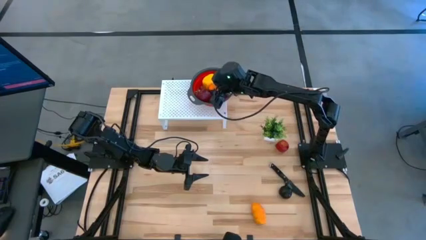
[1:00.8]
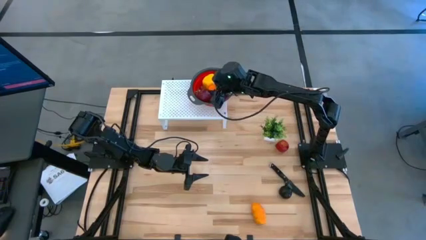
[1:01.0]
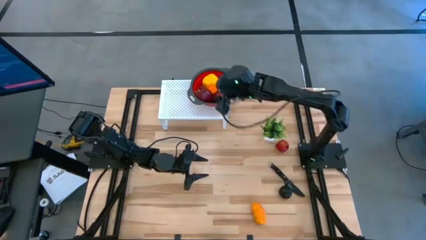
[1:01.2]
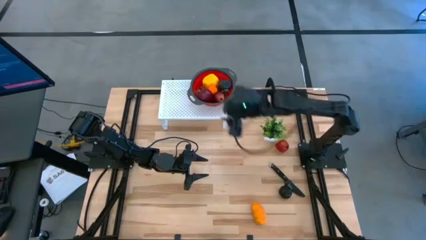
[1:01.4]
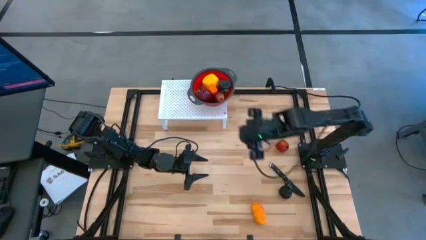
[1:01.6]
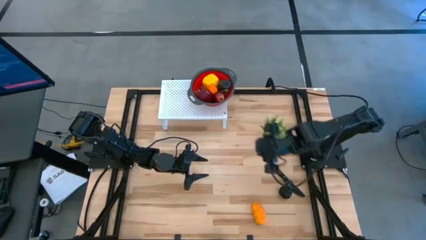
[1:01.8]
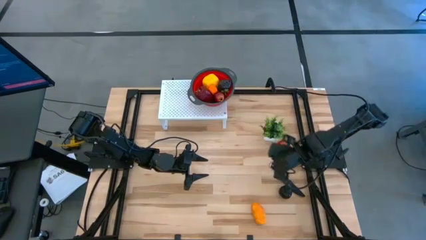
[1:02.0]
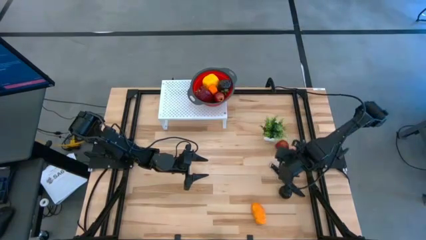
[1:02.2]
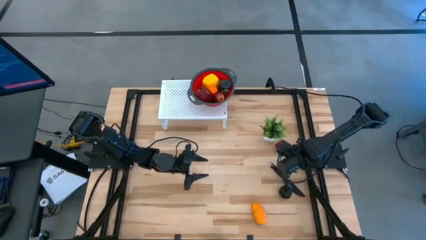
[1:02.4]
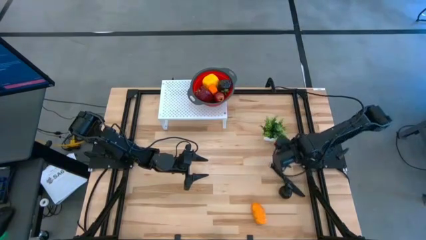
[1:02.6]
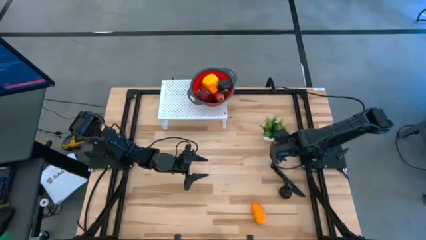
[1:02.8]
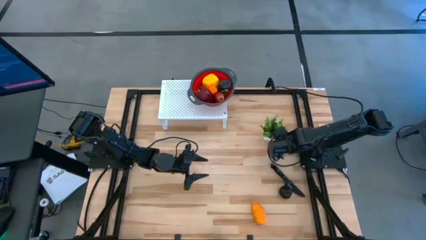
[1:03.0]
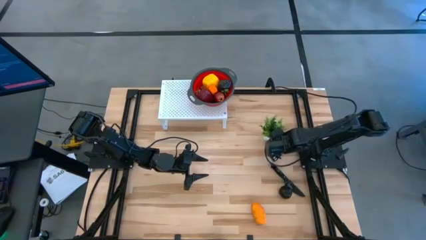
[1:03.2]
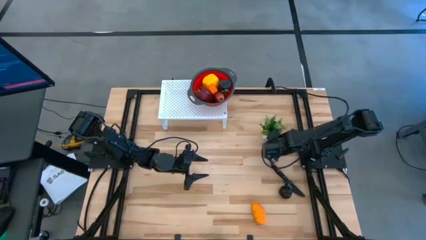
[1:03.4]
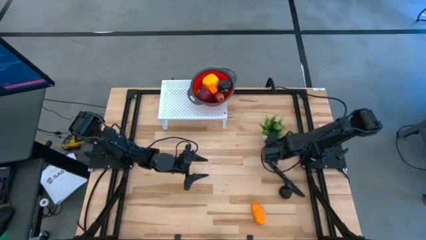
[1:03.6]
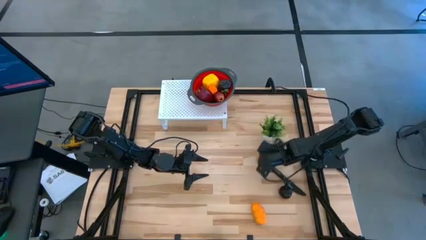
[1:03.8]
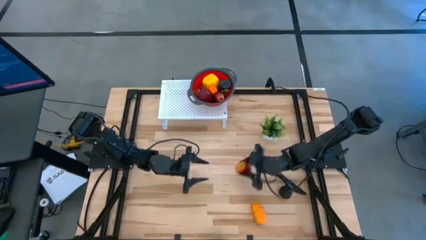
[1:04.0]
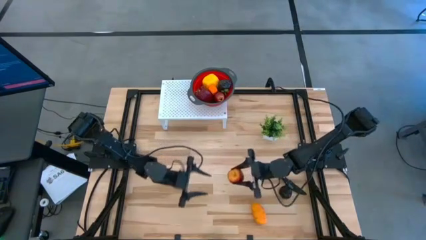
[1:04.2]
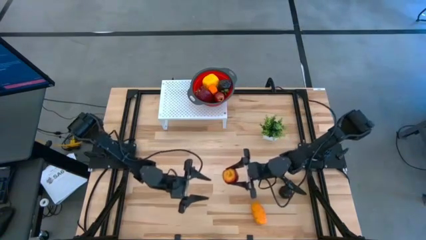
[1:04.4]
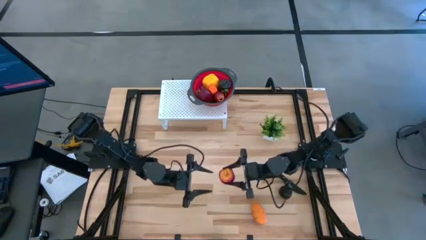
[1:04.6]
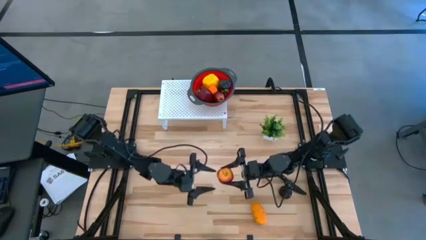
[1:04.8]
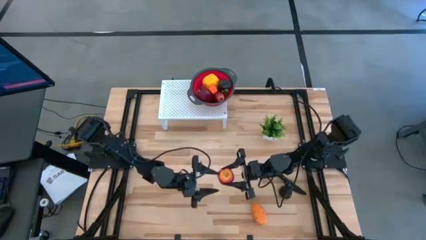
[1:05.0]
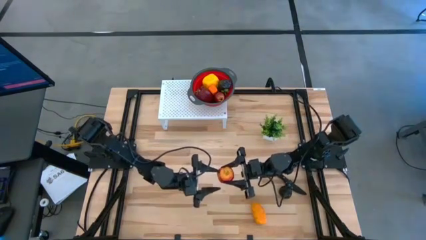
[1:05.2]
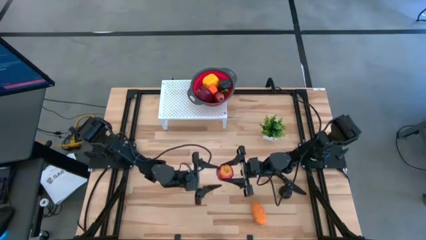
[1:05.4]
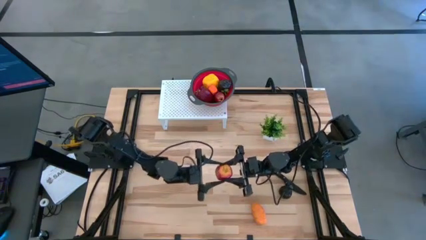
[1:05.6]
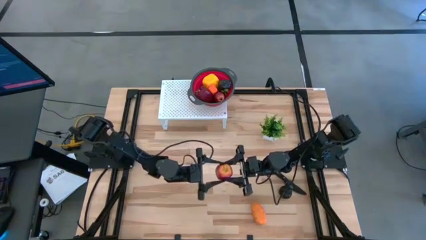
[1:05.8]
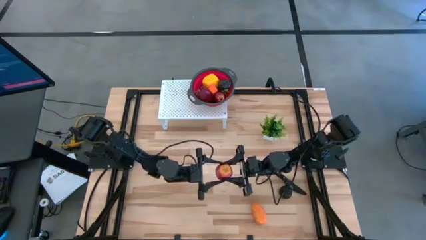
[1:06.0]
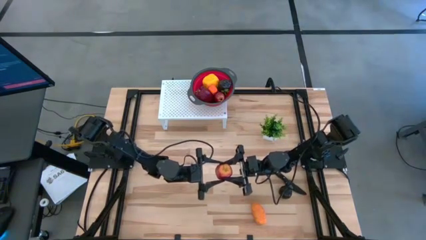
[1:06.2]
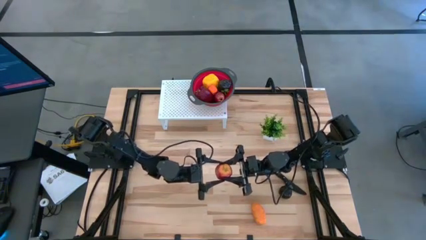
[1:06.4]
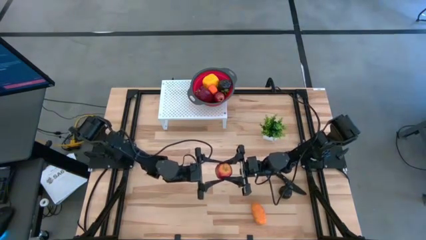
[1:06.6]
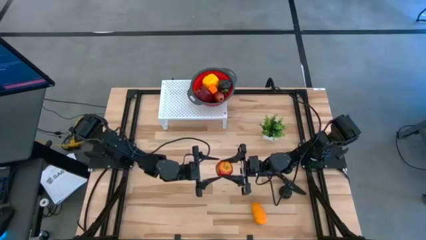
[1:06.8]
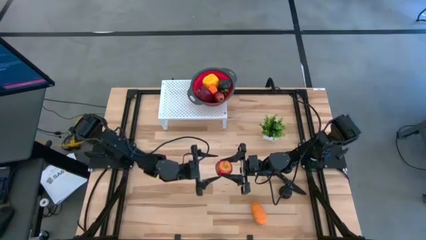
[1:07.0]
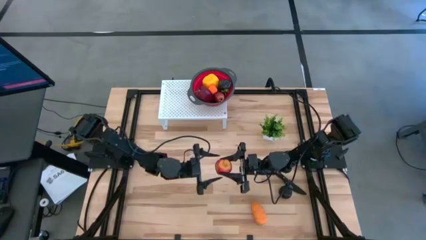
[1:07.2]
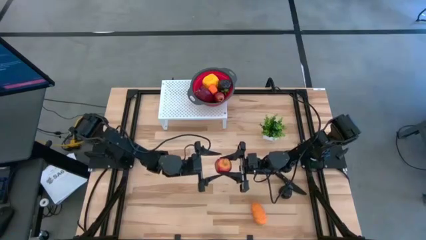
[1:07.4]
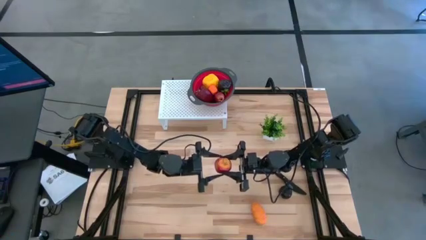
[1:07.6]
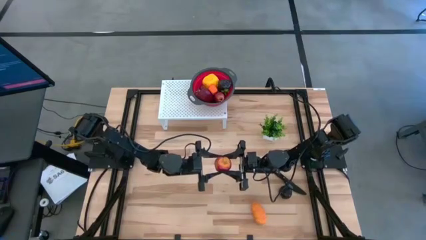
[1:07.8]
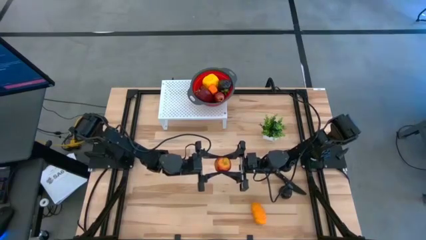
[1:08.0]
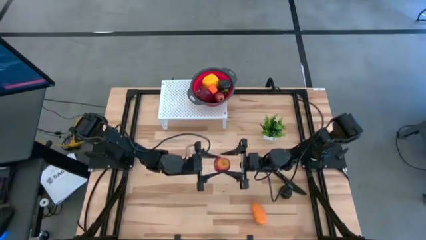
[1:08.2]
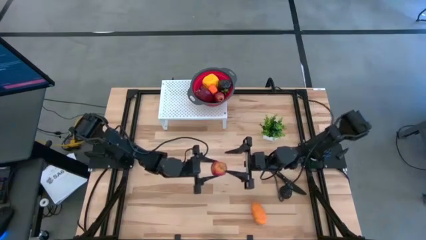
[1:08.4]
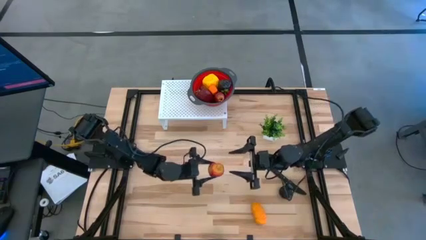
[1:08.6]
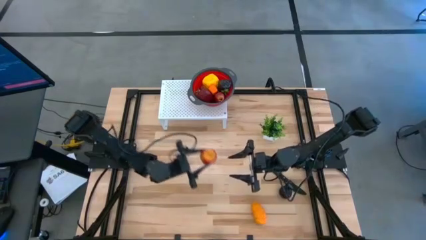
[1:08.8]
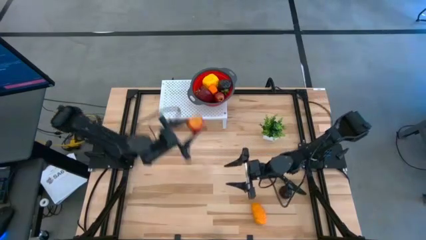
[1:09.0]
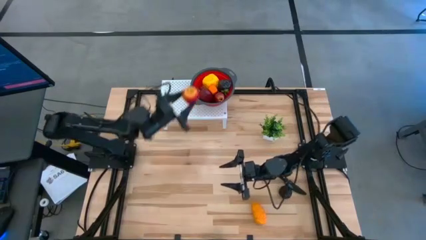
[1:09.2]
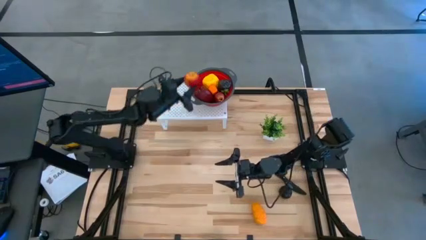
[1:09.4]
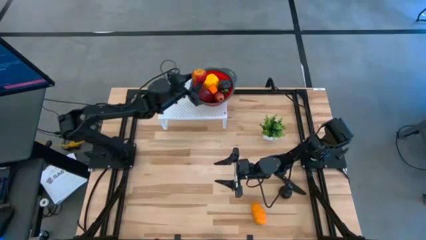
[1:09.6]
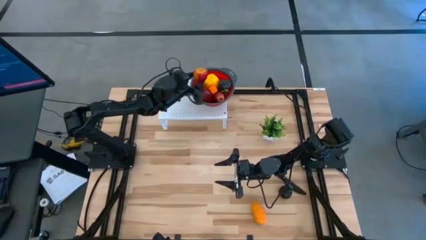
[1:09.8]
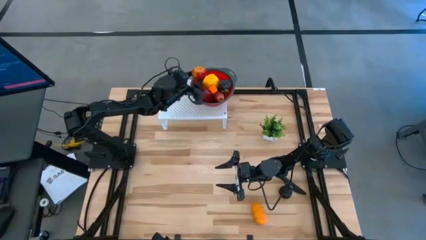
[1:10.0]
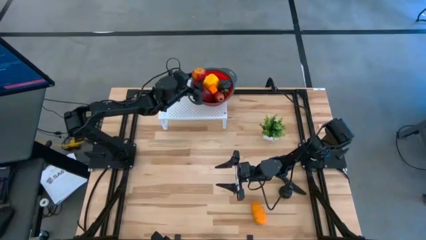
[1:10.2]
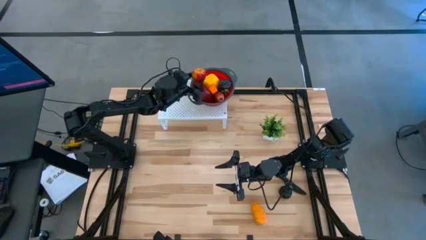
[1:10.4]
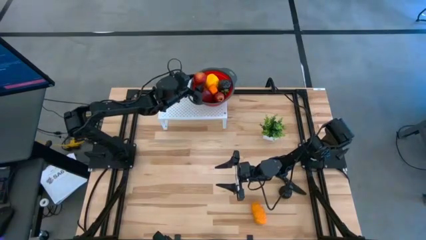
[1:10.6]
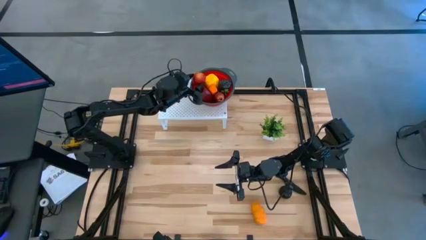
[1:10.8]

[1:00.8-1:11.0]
Task: Pick & Place Fruit
Put the red apple into the red strainer bowl on the shelf

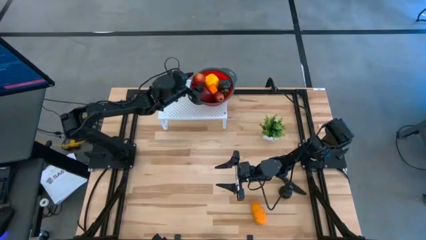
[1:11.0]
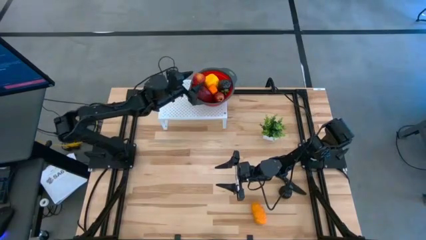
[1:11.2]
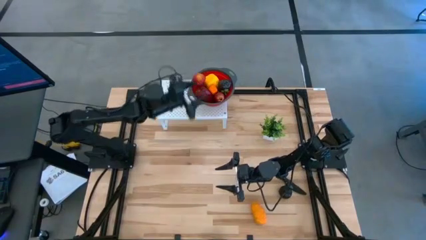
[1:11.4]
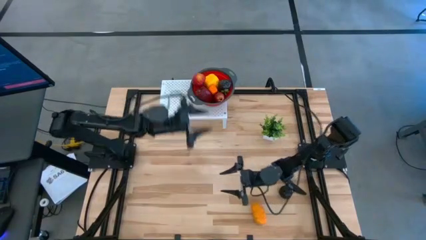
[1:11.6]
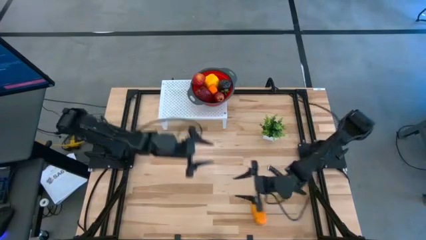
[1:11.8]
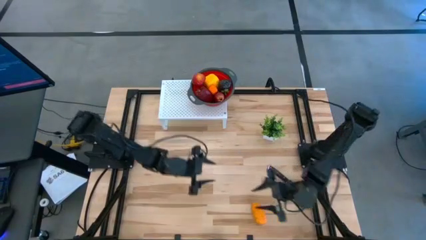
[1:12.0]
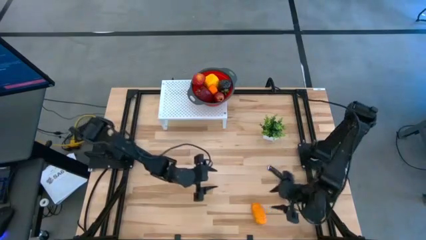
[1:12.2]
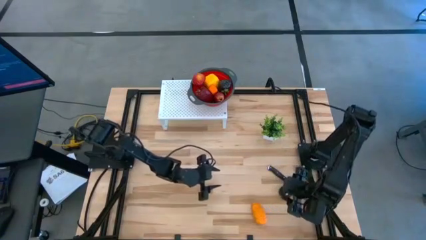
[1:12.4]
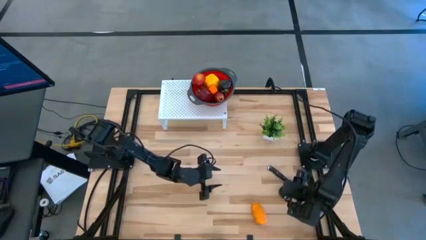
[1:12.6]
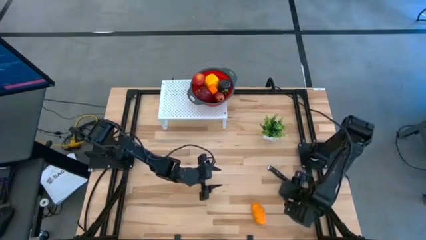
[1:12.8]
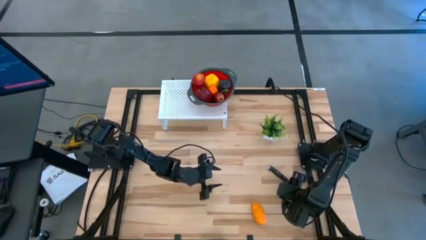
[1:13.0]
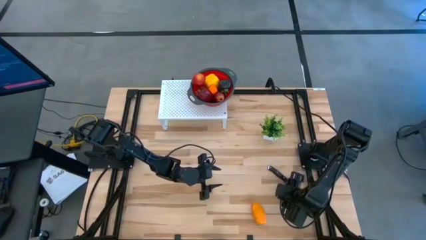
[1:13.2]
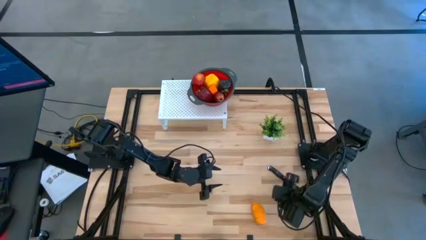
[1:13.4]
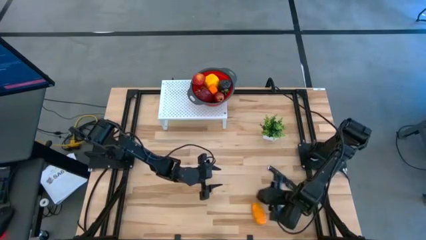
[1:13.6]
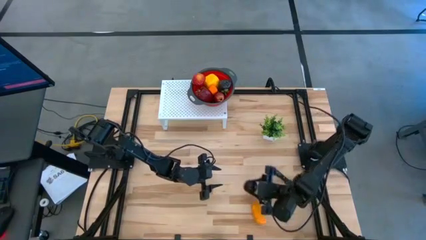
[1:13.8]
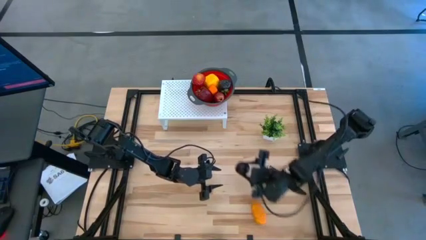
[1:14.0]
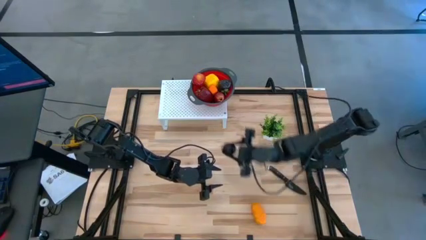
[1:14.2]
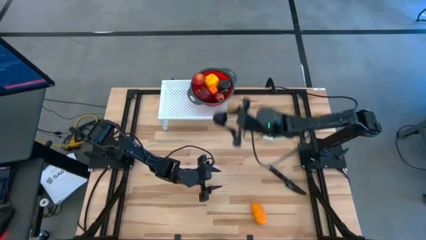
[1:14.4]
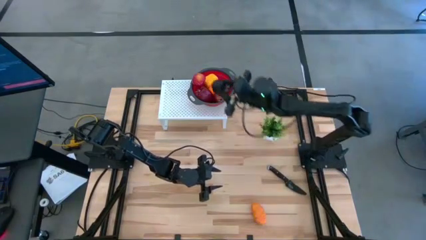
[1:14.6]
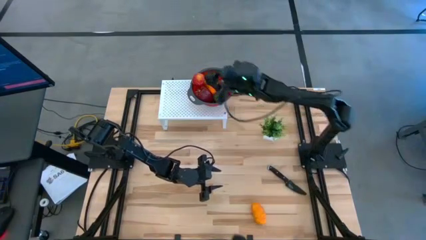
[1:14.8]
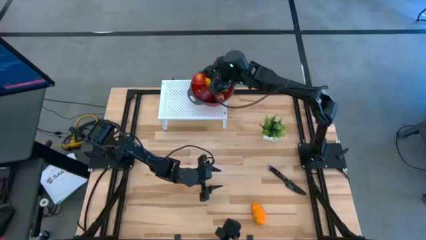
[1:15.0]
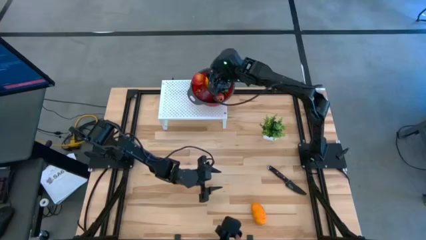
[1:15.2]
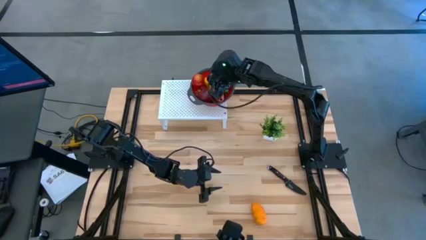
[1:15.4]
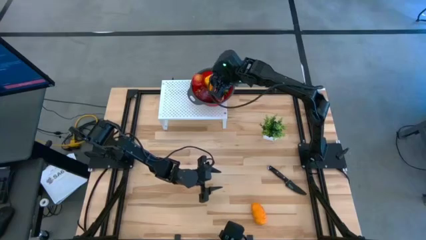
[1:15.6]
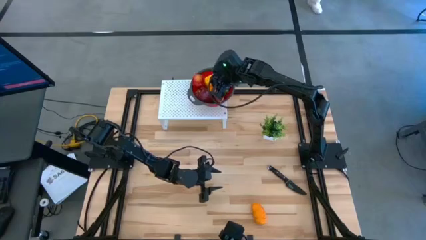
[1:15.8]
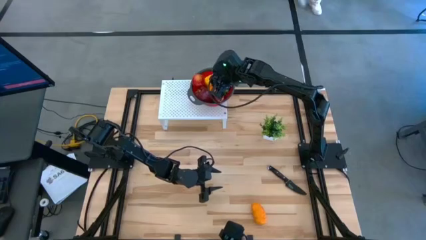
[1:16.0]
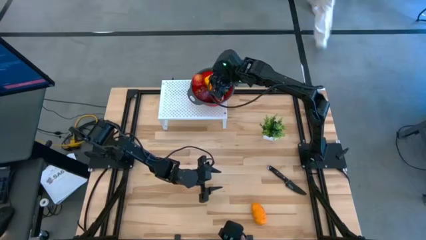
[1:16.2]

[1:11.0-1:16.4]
Put the black plum into the red strainer bowl on the shelf

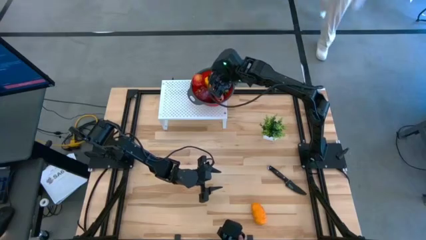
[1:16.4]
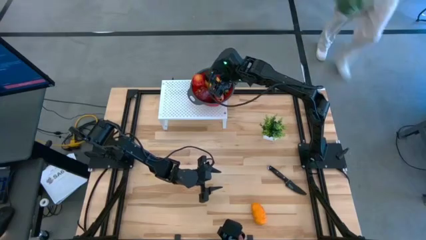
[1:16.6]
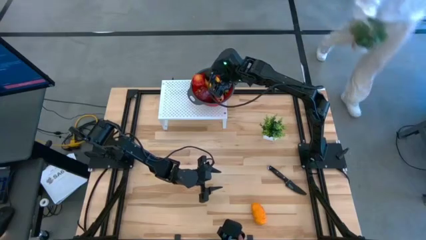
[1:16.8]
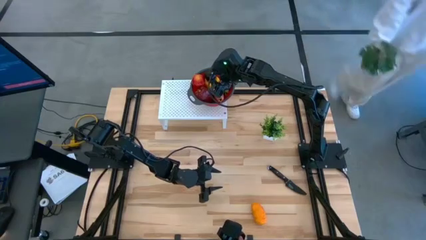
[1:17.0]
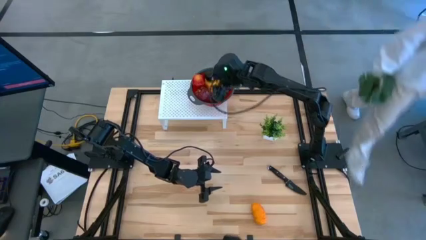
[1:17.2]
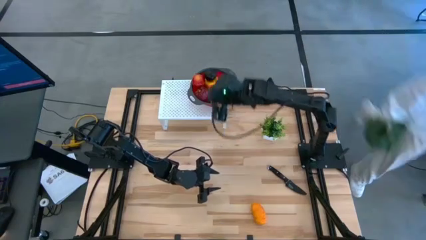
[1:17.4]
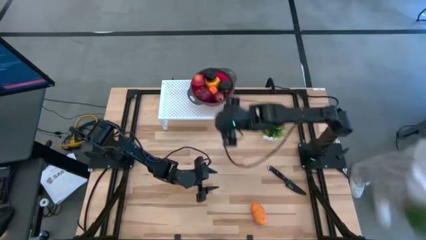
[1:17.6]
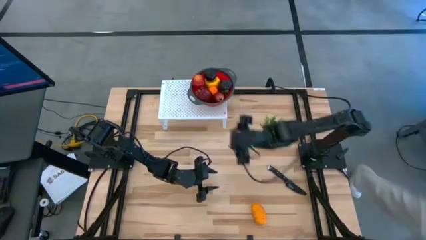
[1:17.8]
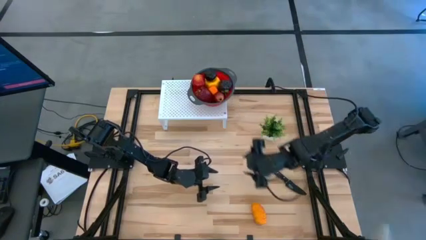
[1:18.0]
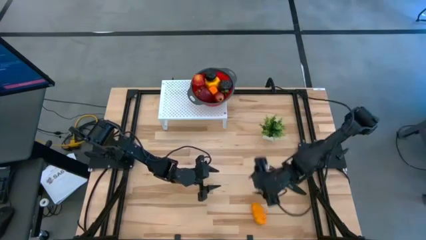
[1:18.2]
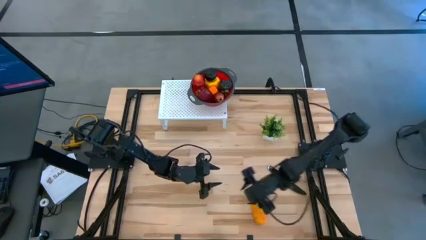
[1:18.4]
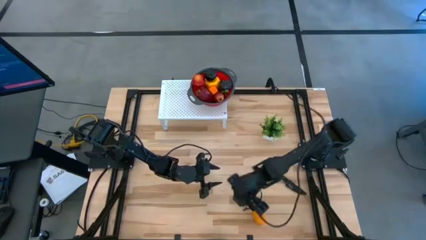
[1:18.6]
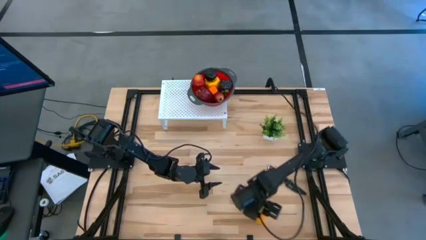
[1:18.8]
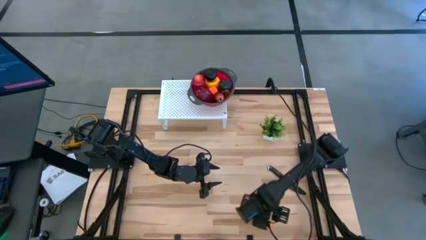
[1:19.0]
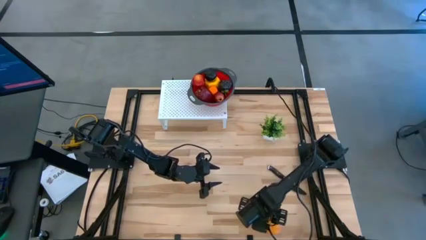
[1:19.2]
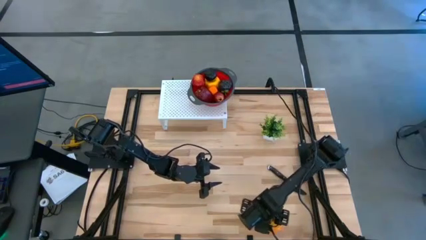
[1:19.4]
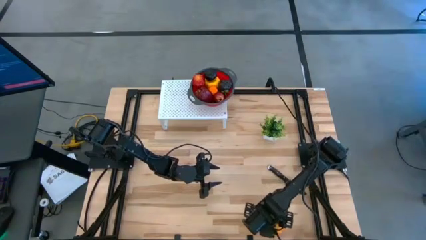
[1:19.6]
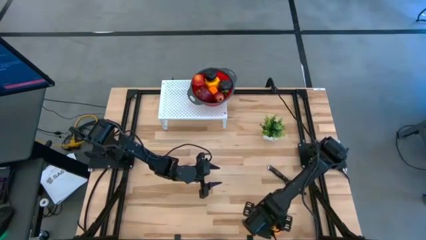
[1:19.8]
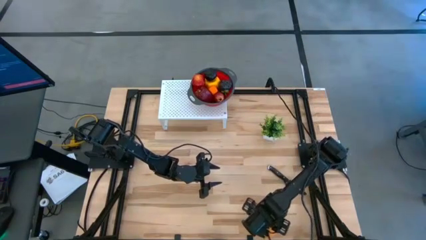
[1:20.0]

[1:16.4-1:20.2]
Put the yellow mango into the red strainer bowl on the shelf
